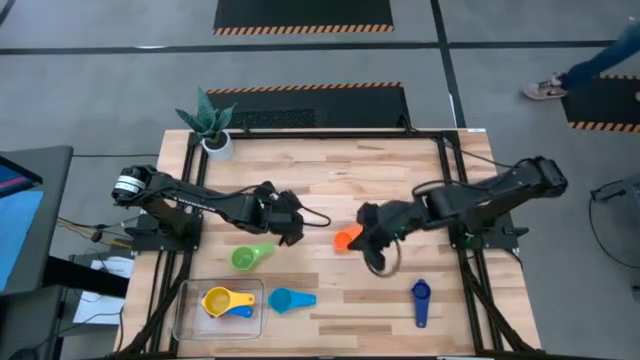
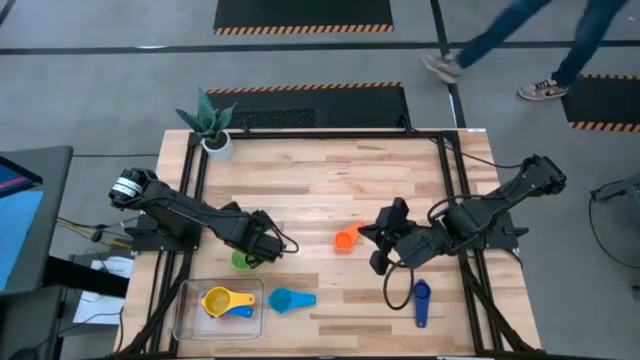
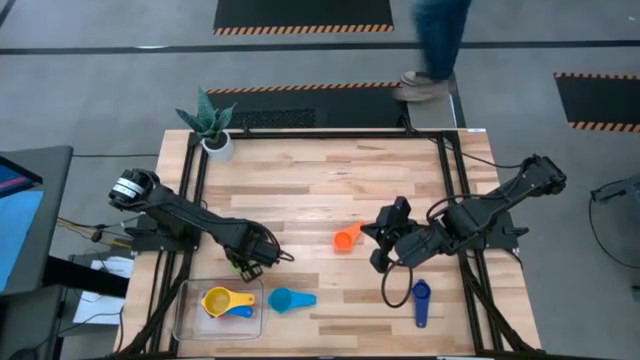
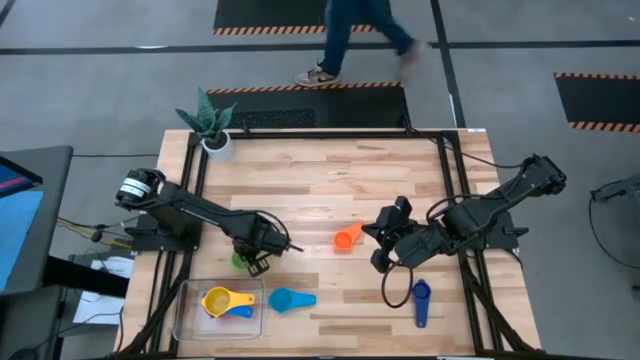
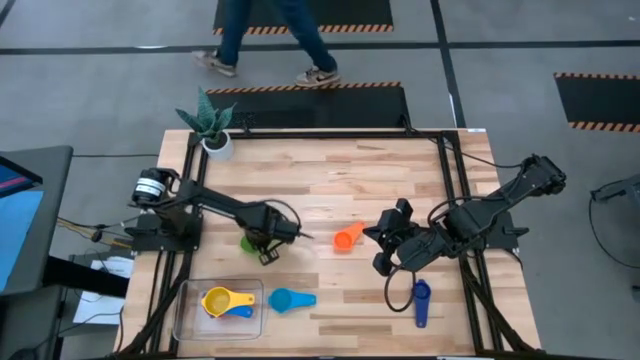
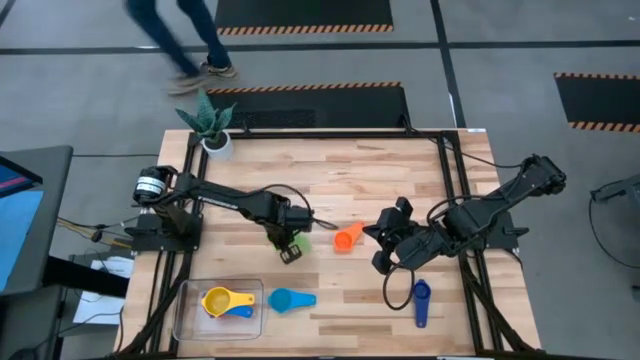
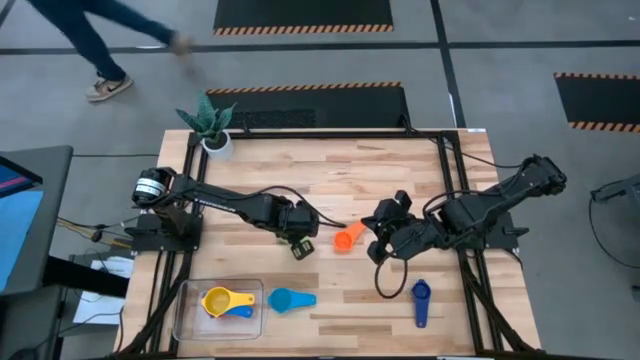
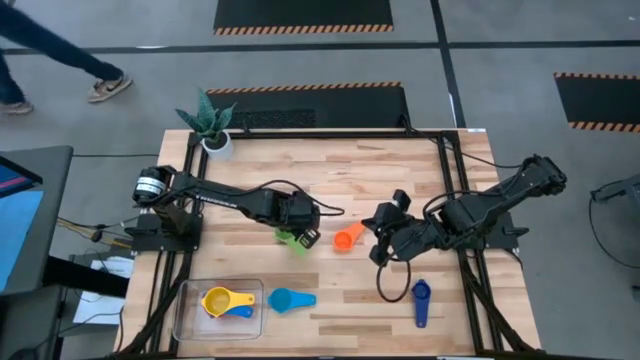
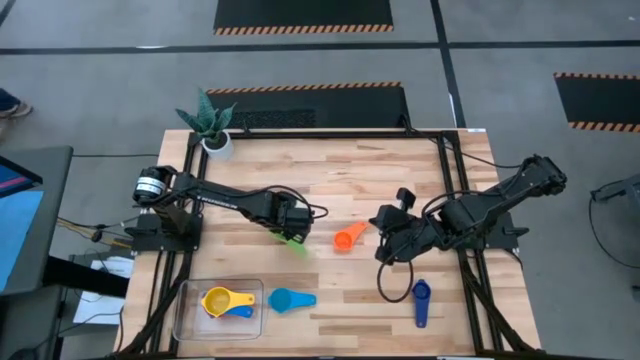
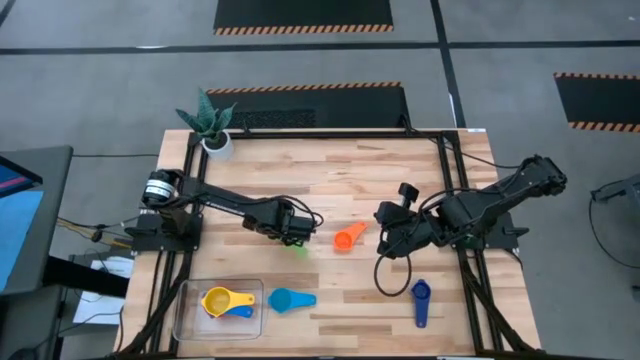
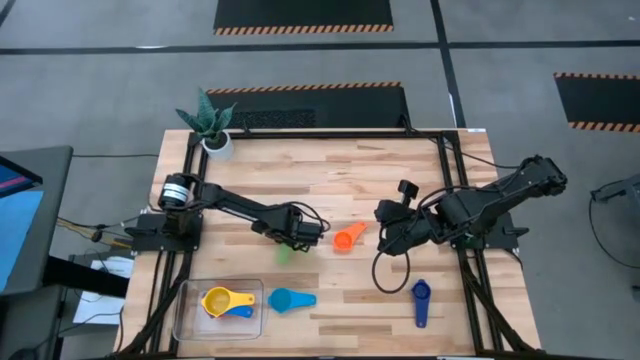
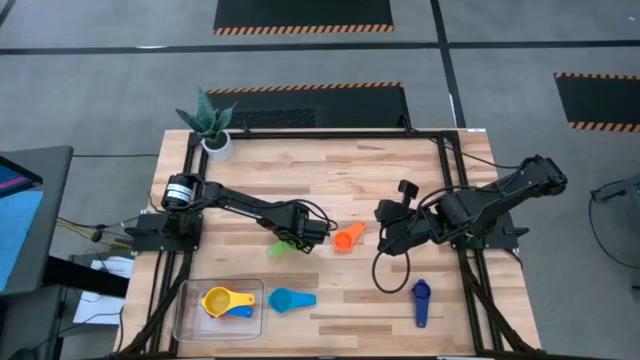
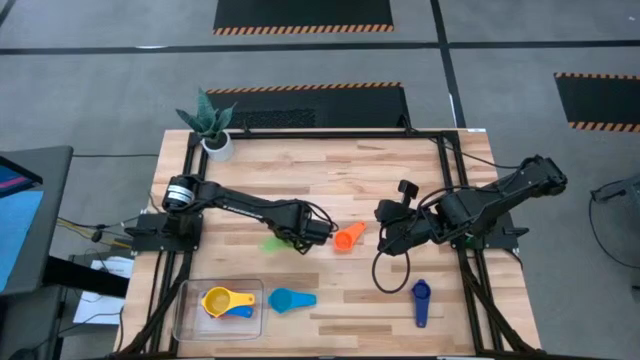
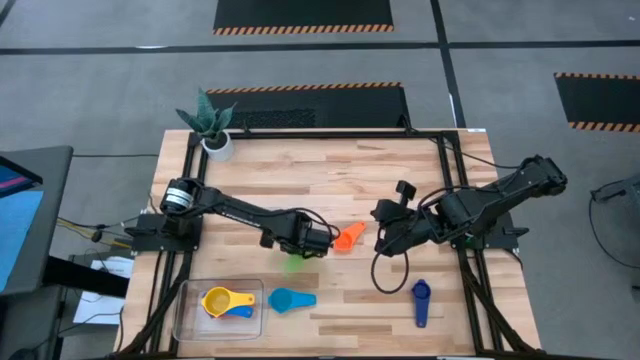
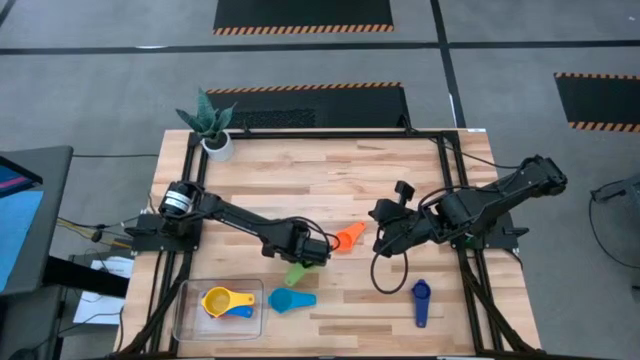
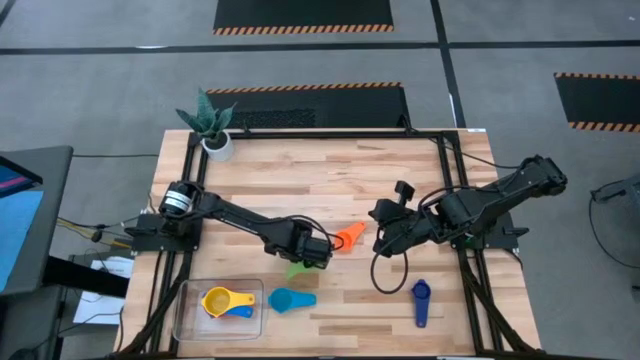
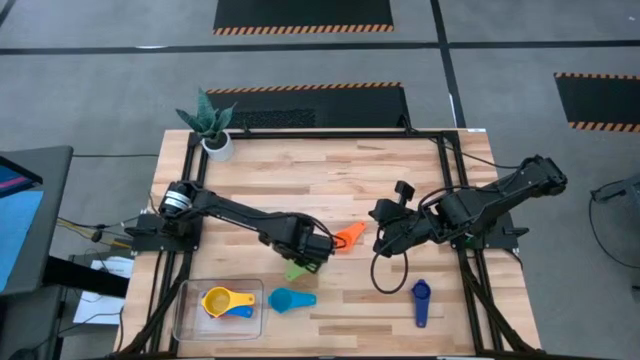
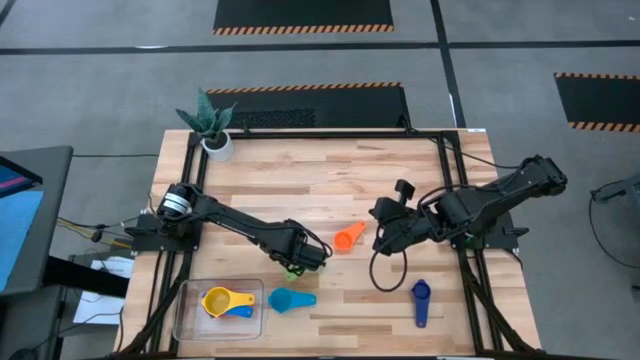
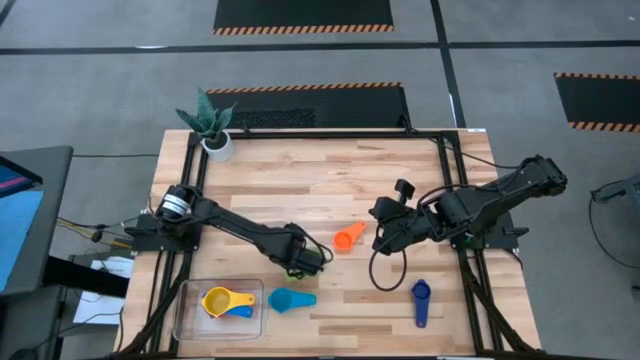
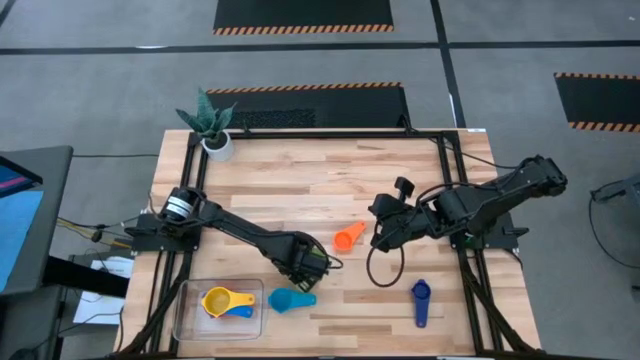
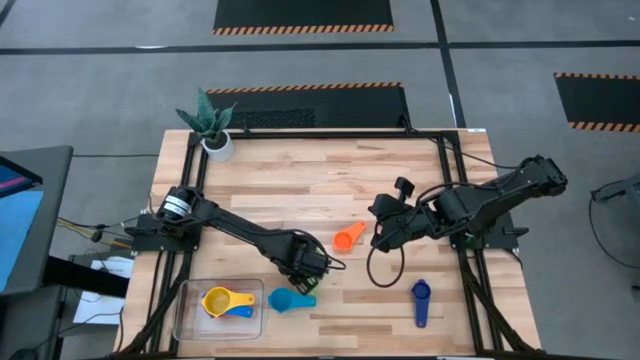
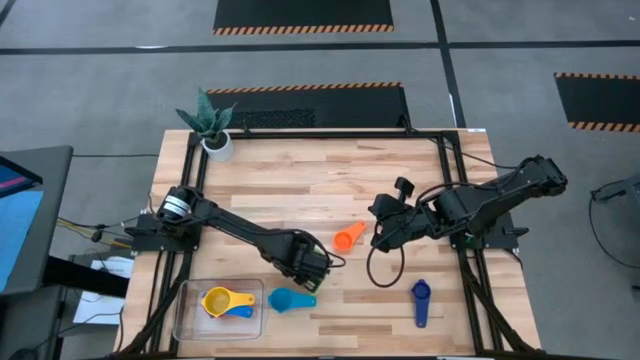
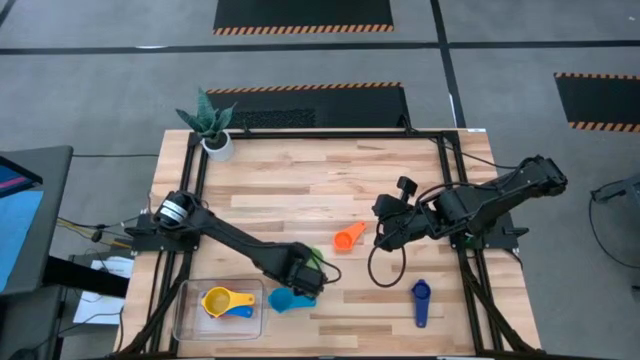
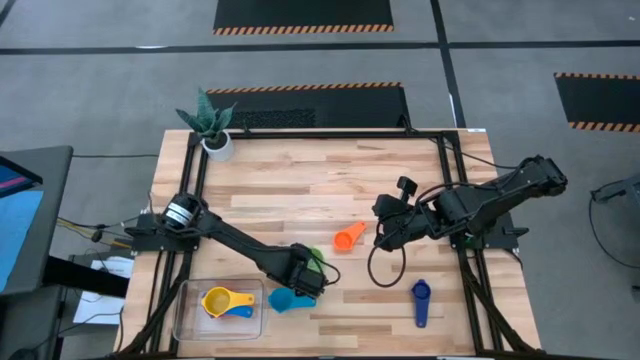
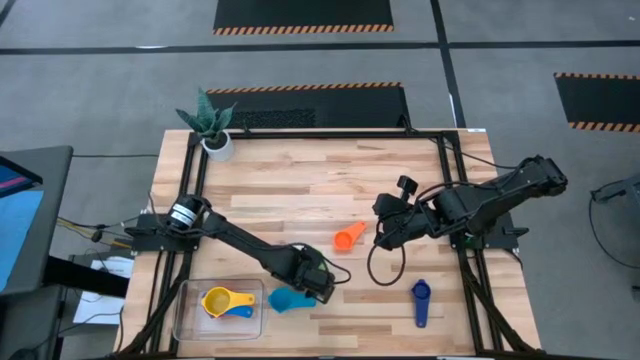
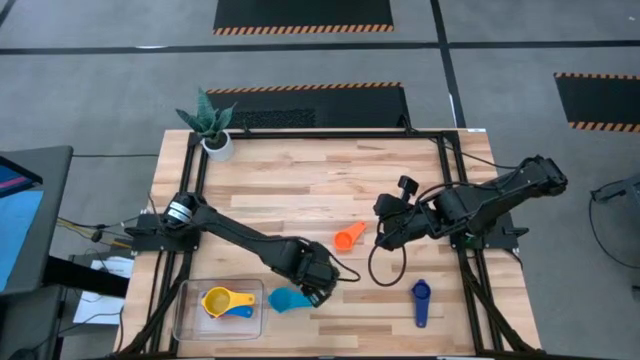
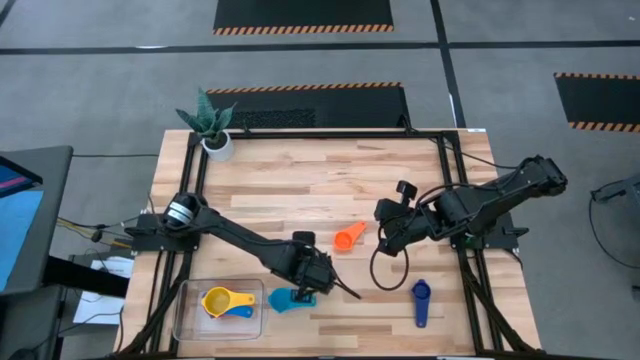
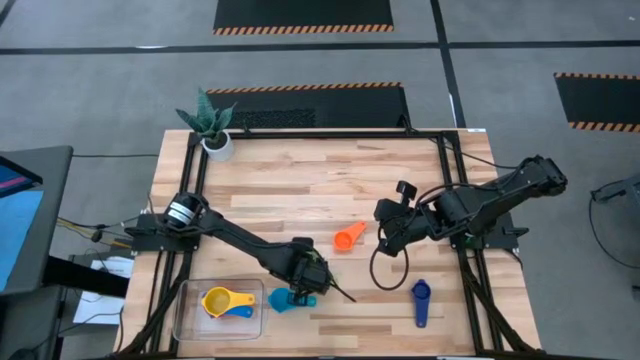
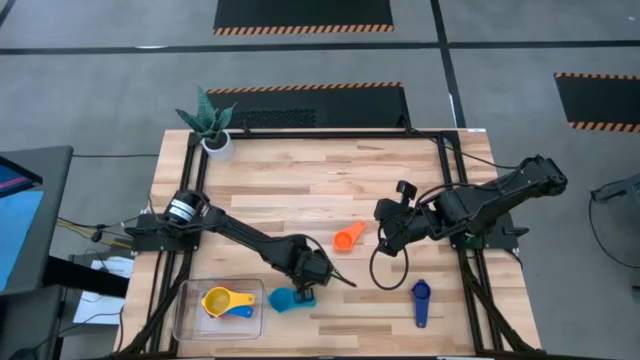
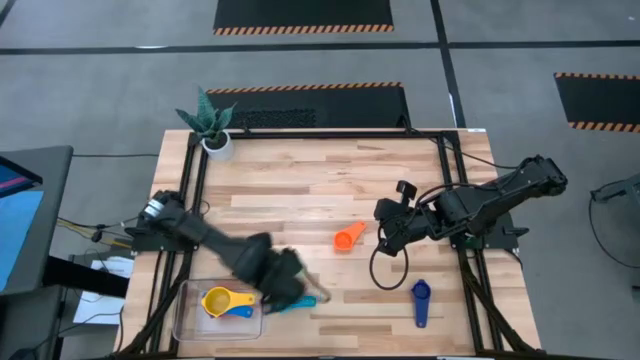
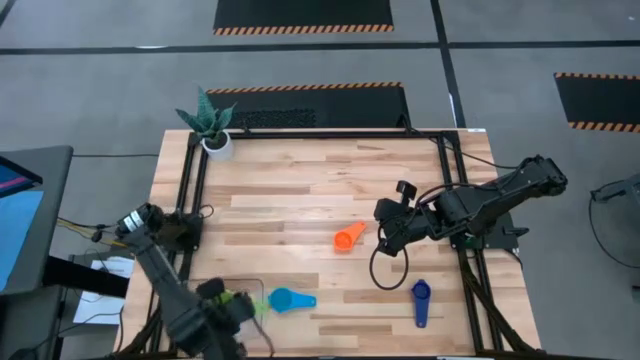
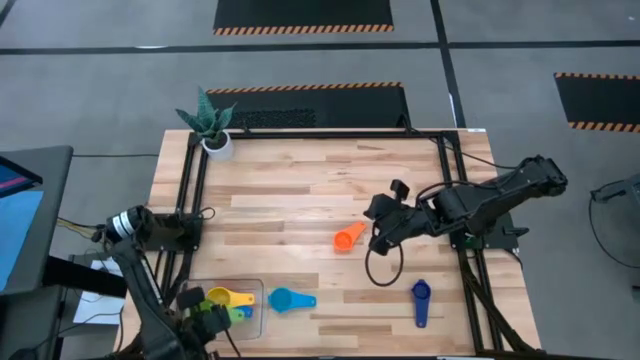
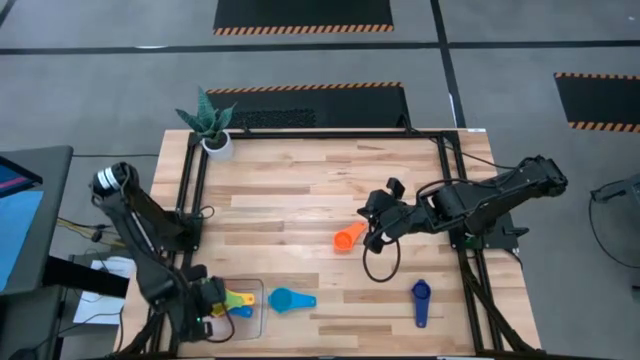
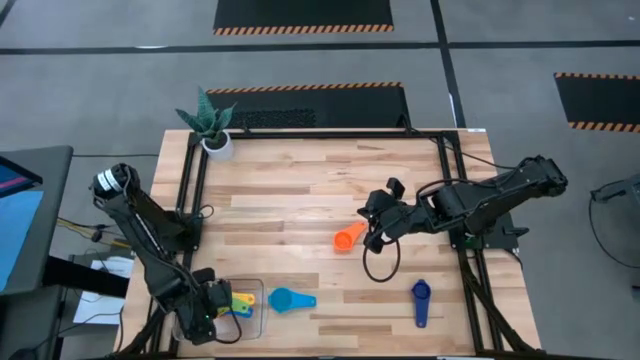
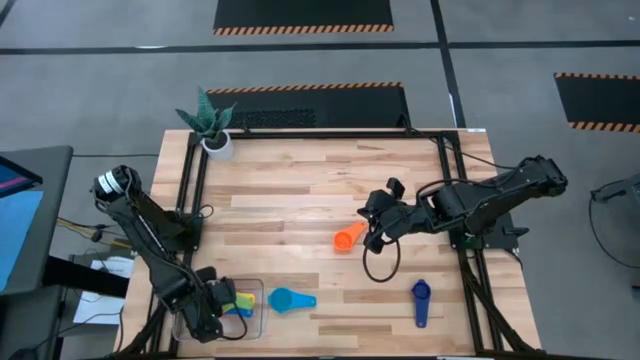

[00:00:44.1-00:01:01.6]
Task: Nest measuring cups in basket
Stack the green measuring cup on top of the yellow measuring cup in the transparent bin

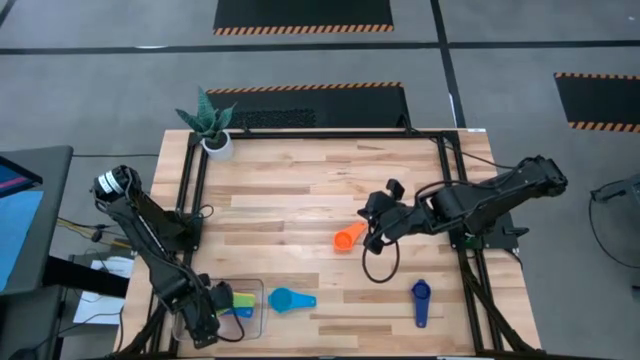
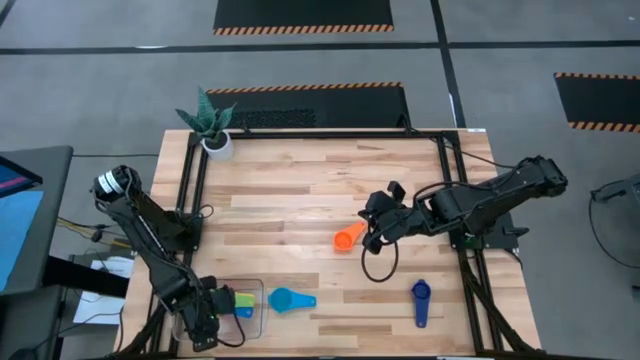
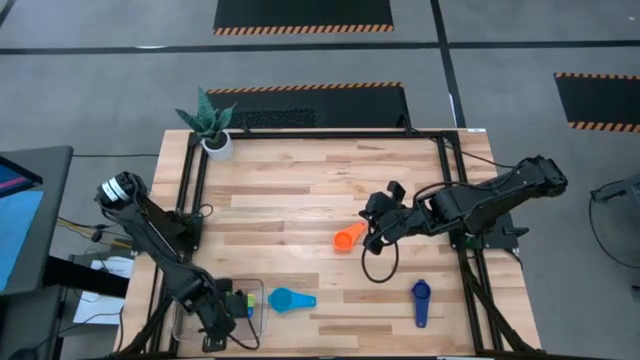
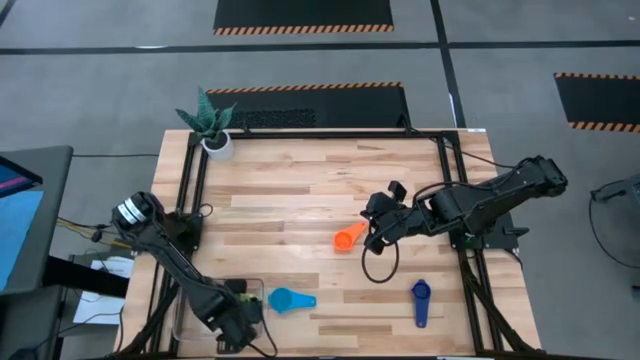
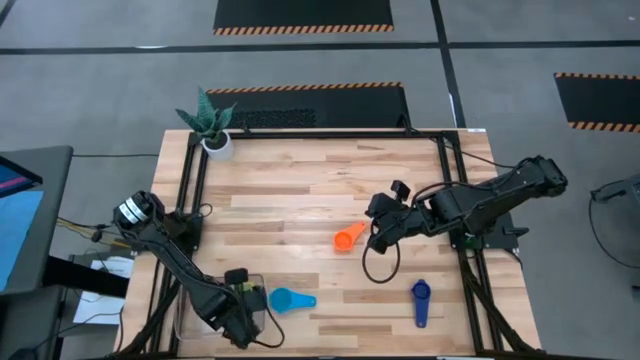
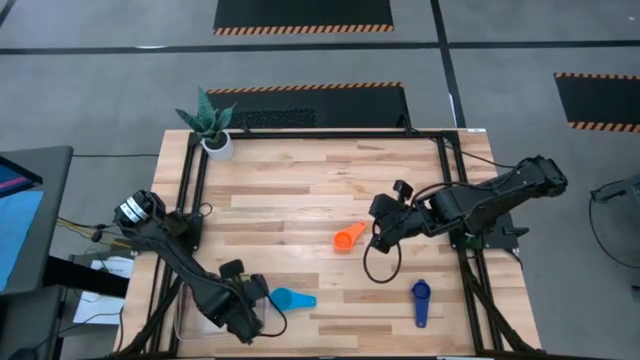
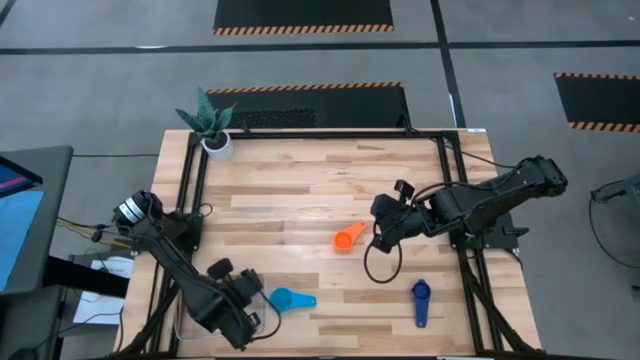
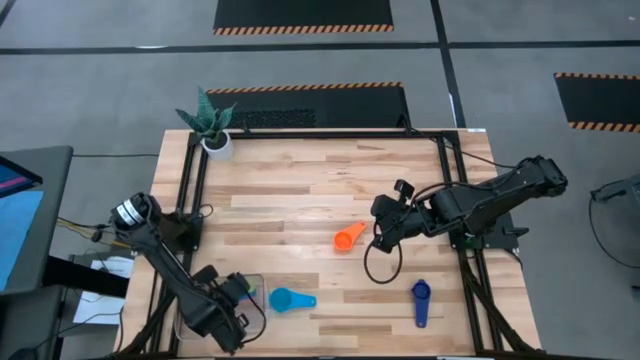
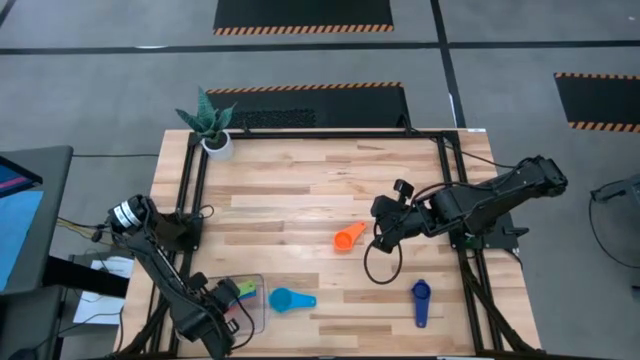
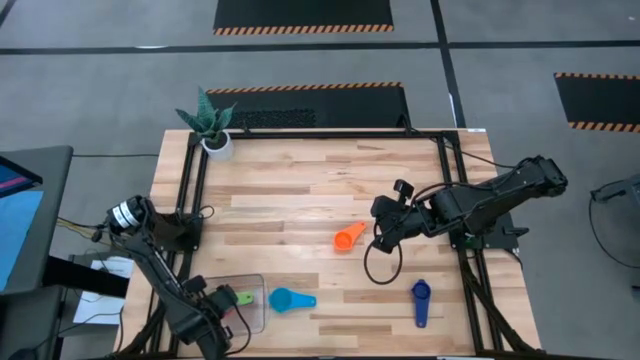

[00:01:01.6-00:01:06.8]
Adjust the measuring cups in the transparent bin
